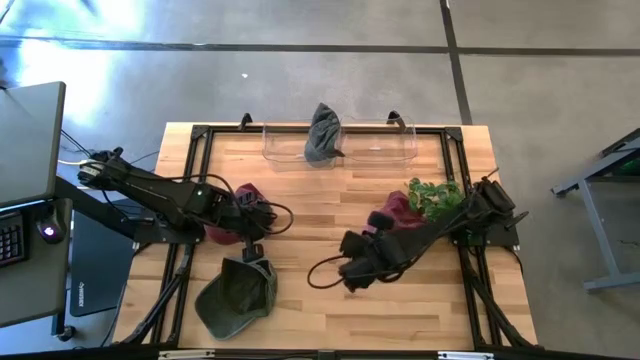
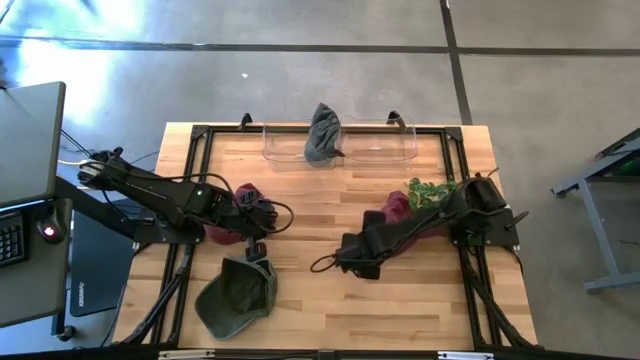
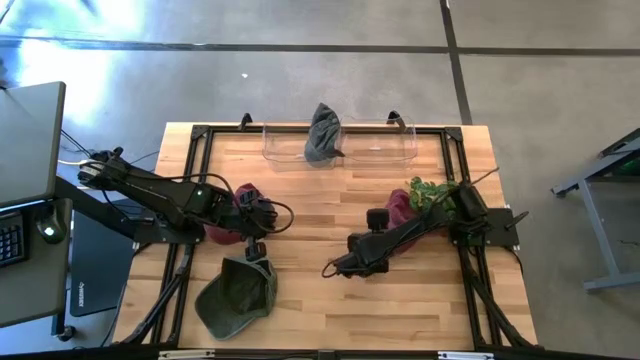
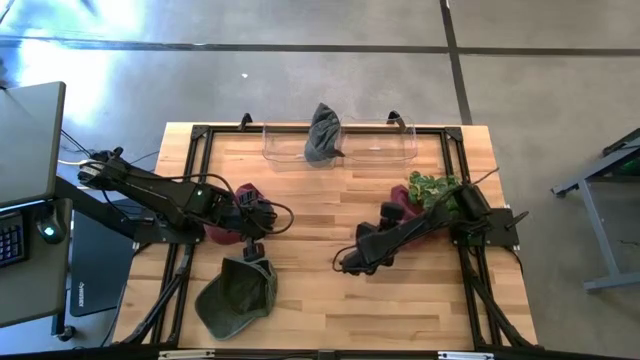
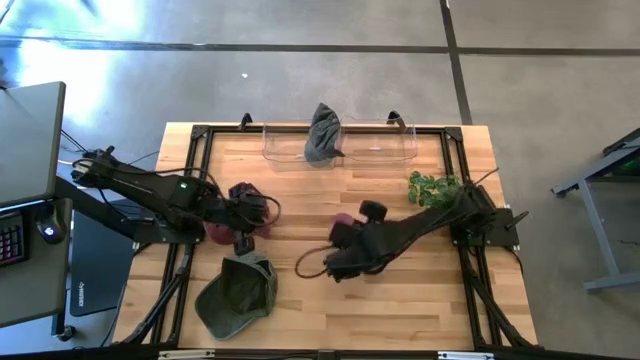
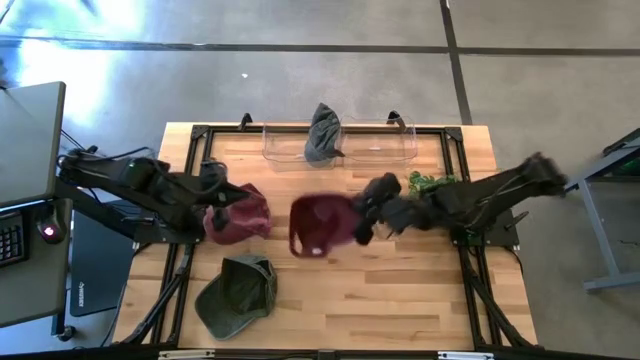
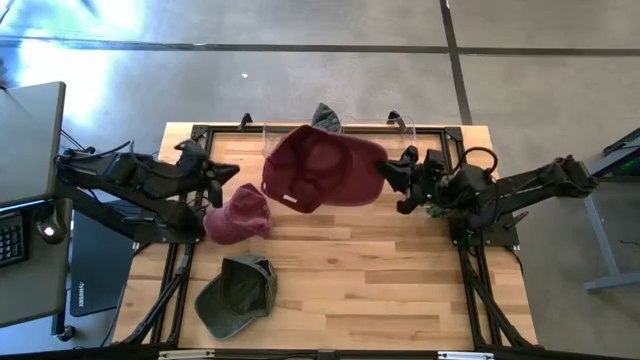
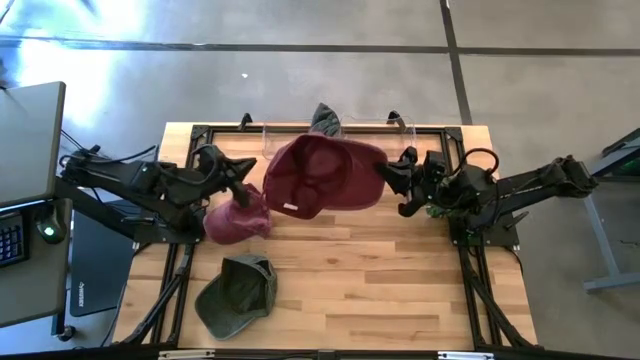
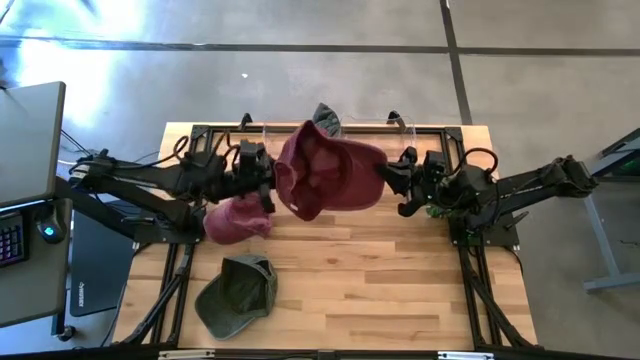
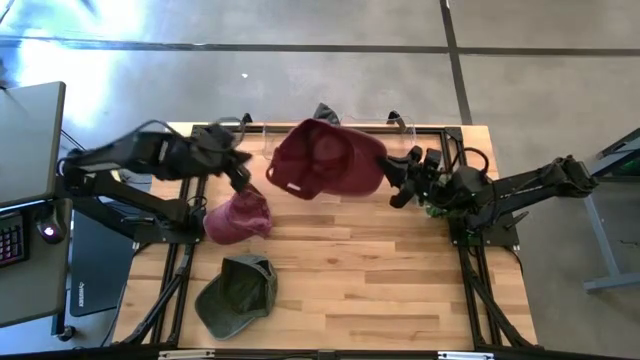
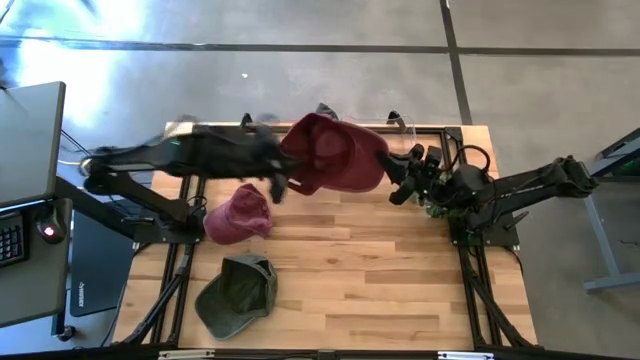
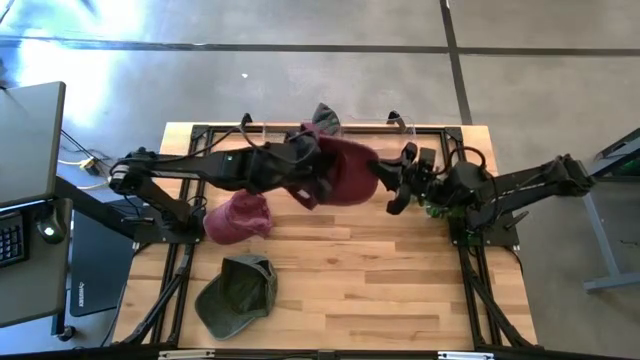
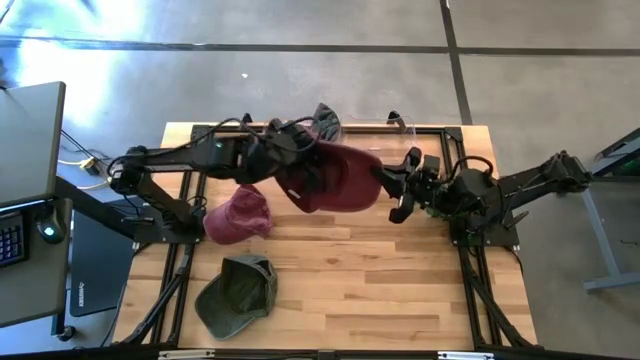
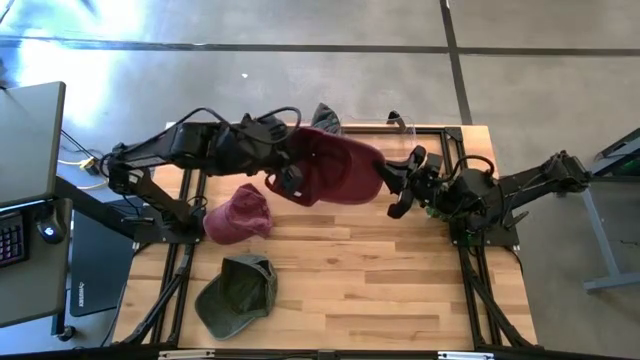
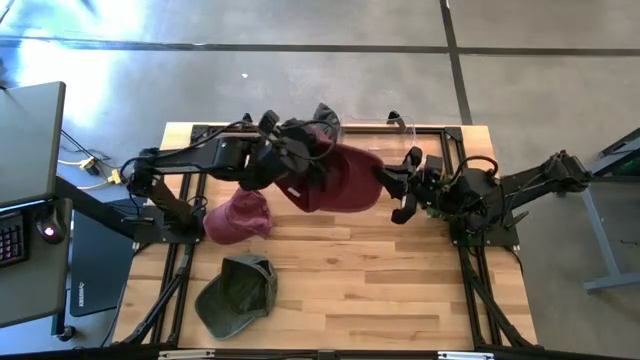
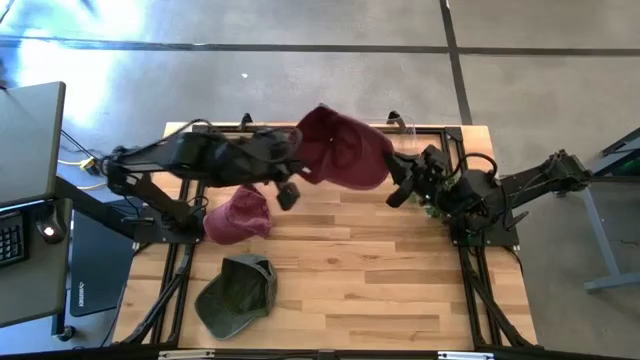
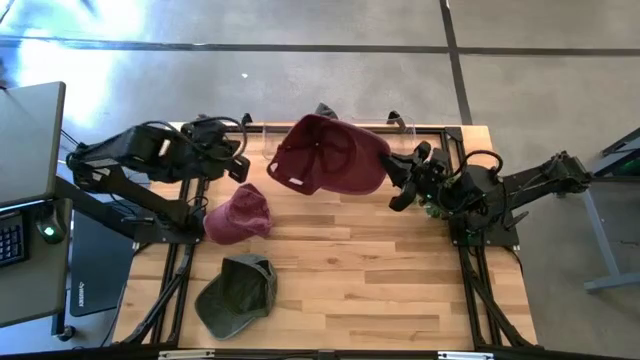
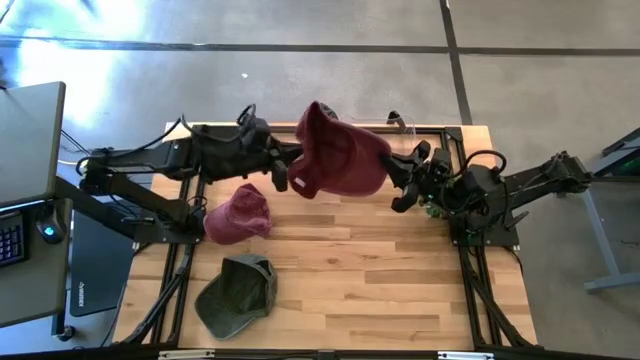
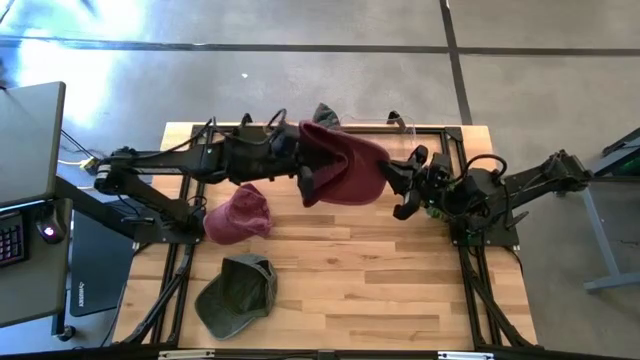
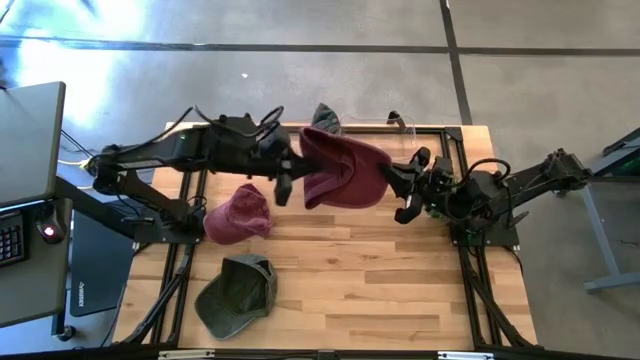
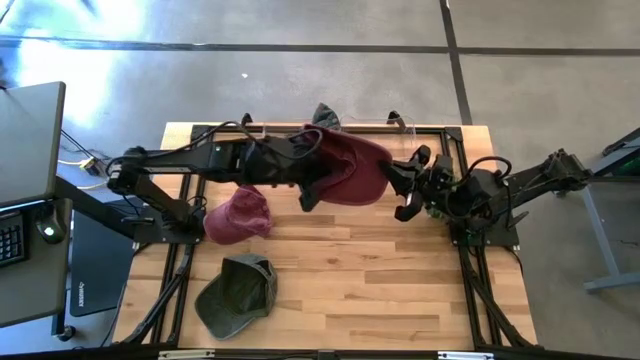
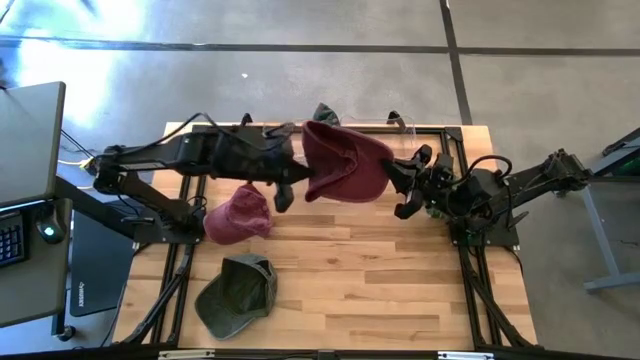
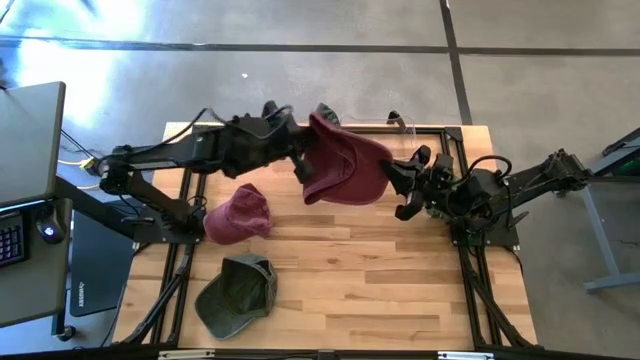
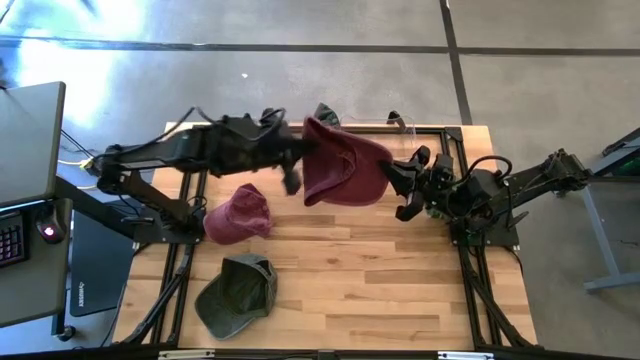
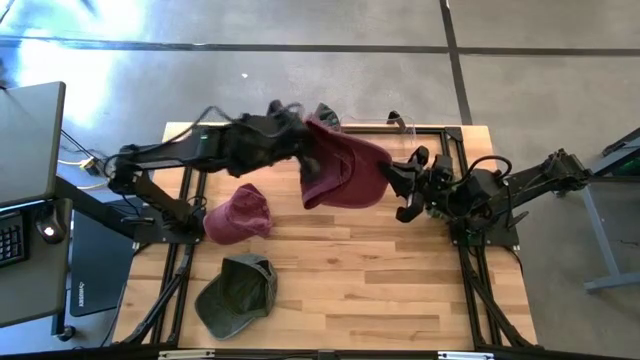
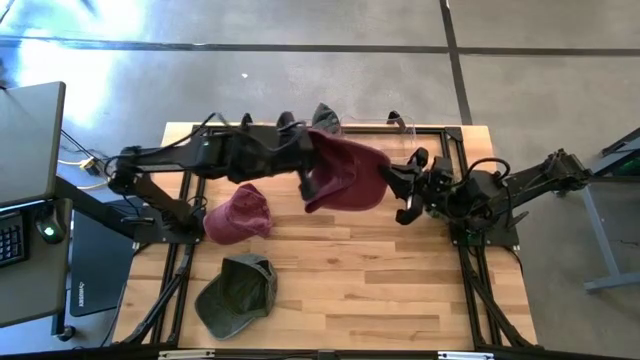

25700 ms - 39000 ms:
Task: Pick & Place hat
Put the right red cap into the right transparent bin
